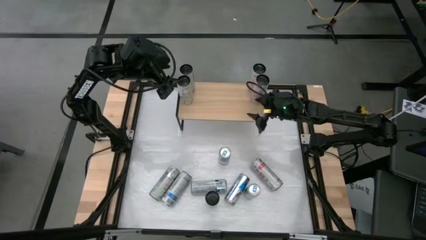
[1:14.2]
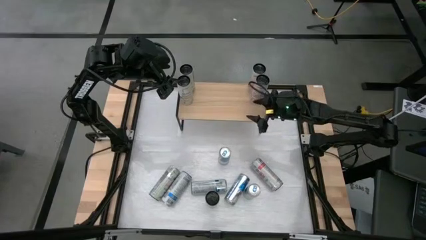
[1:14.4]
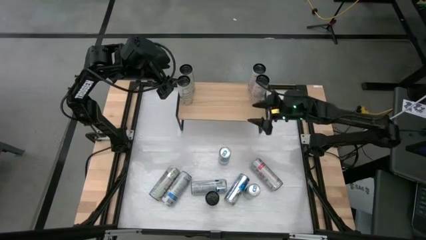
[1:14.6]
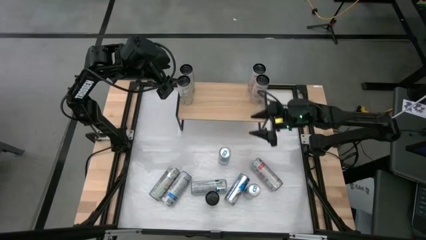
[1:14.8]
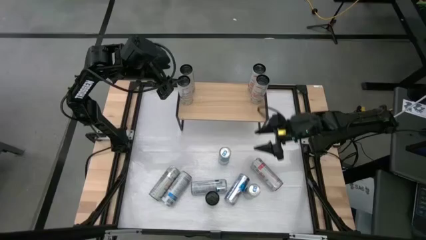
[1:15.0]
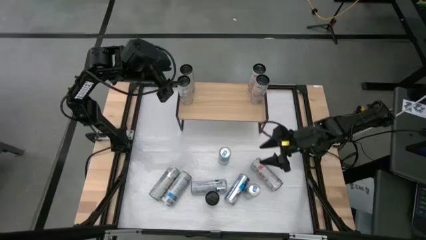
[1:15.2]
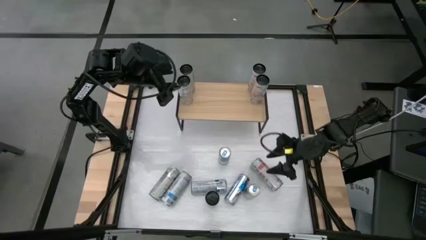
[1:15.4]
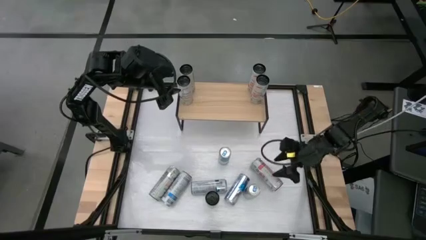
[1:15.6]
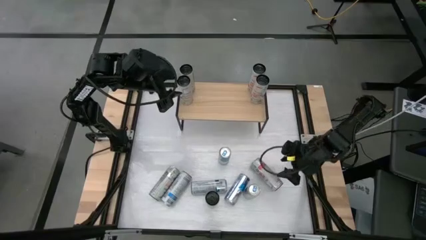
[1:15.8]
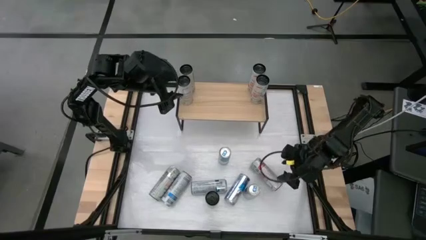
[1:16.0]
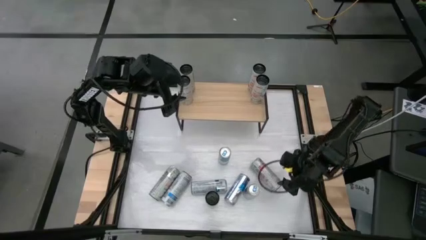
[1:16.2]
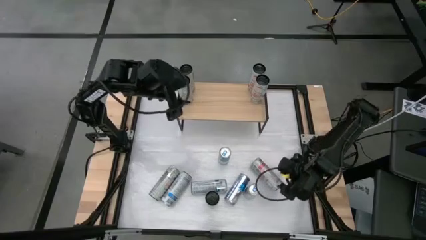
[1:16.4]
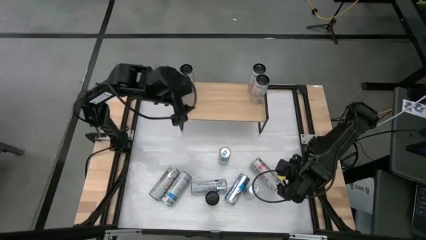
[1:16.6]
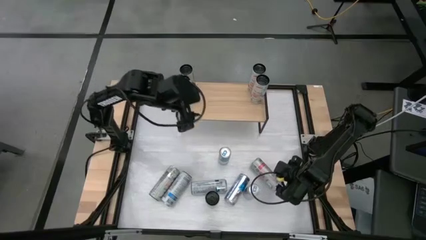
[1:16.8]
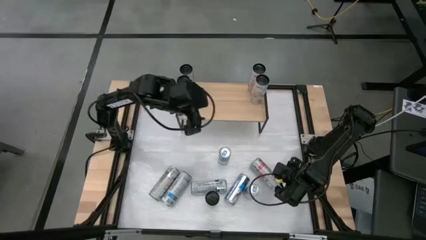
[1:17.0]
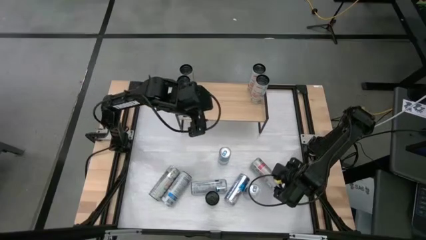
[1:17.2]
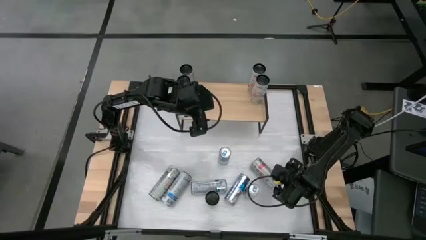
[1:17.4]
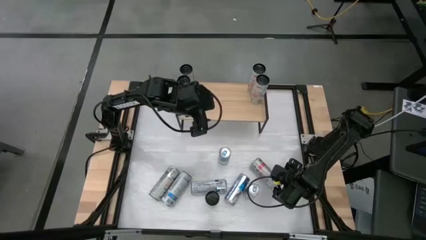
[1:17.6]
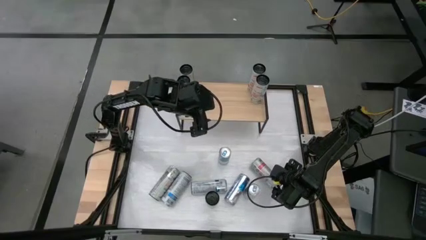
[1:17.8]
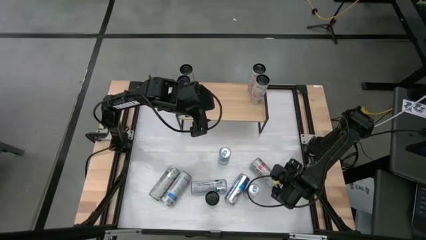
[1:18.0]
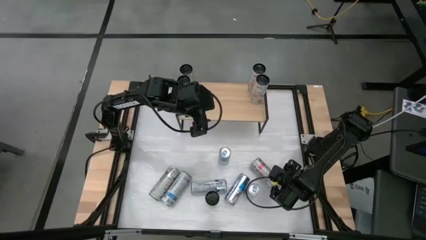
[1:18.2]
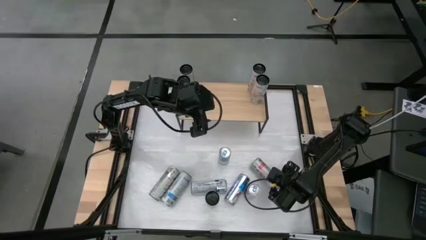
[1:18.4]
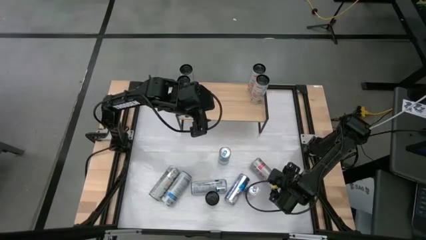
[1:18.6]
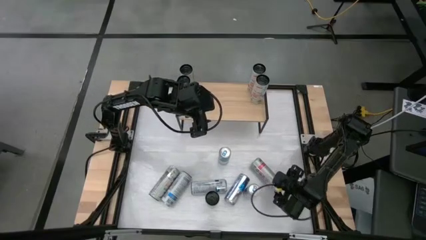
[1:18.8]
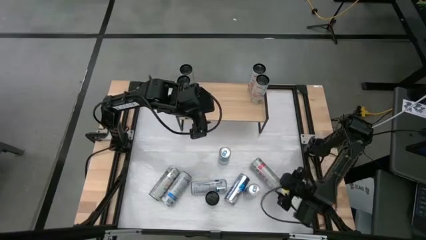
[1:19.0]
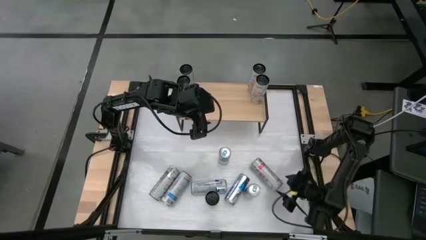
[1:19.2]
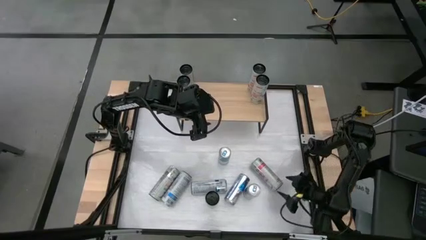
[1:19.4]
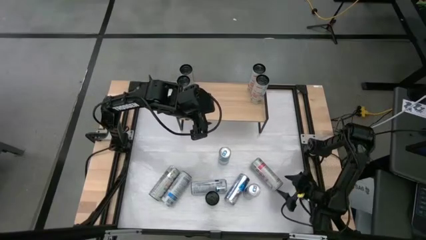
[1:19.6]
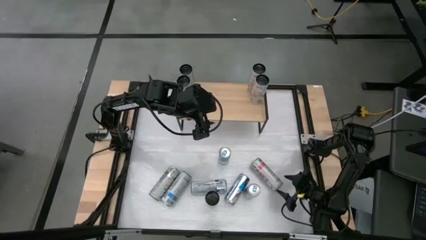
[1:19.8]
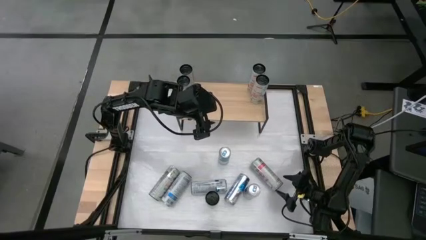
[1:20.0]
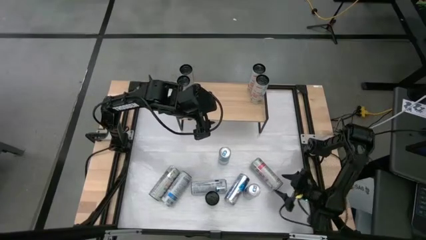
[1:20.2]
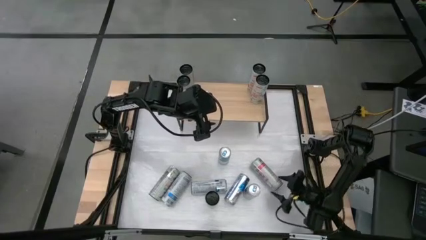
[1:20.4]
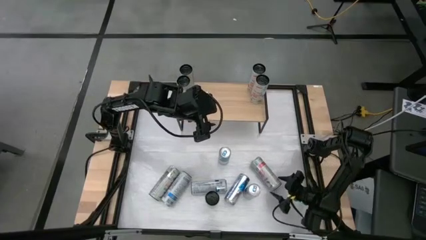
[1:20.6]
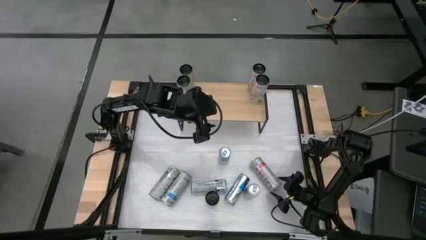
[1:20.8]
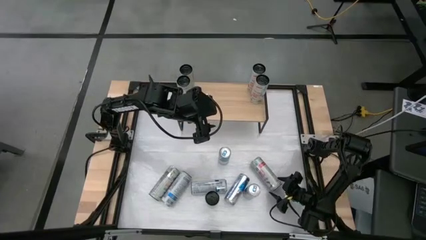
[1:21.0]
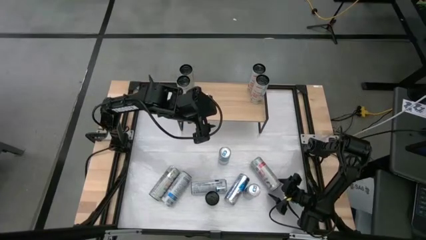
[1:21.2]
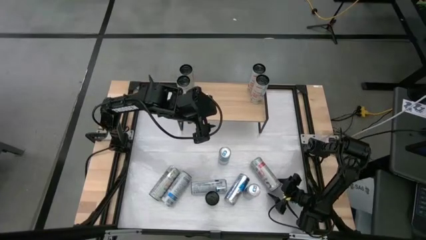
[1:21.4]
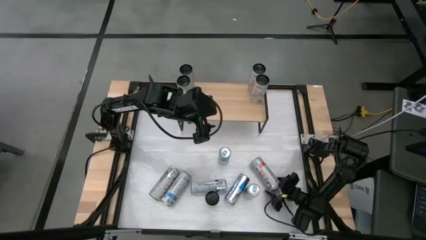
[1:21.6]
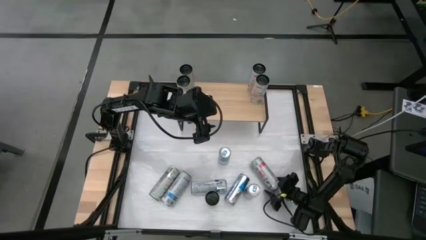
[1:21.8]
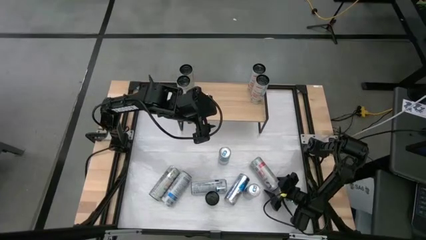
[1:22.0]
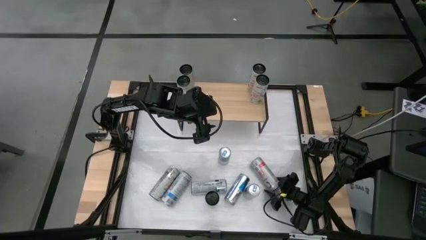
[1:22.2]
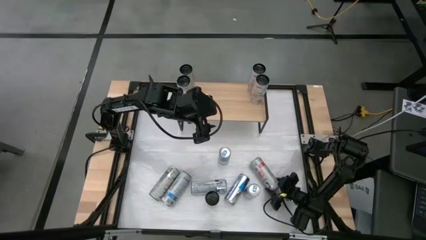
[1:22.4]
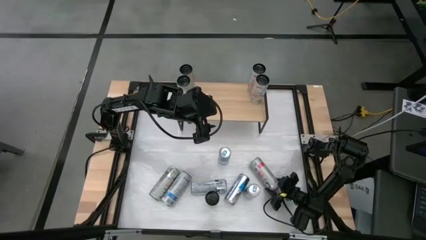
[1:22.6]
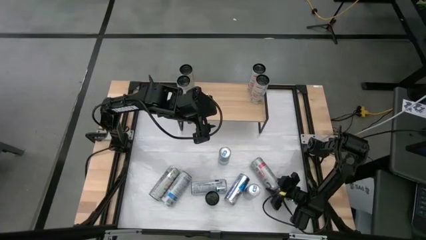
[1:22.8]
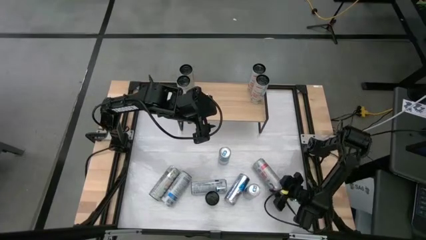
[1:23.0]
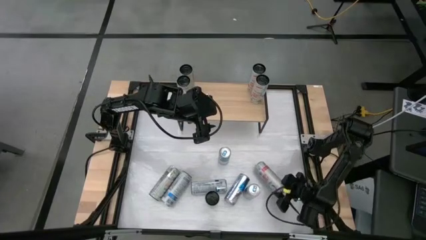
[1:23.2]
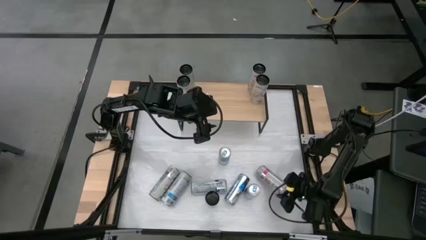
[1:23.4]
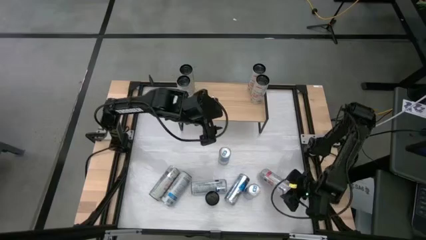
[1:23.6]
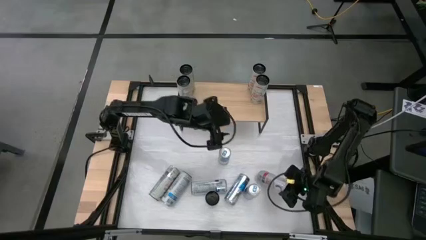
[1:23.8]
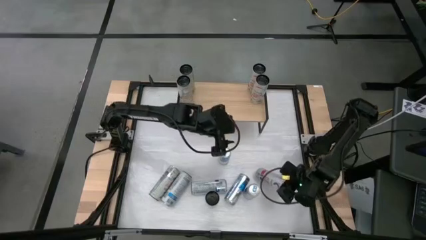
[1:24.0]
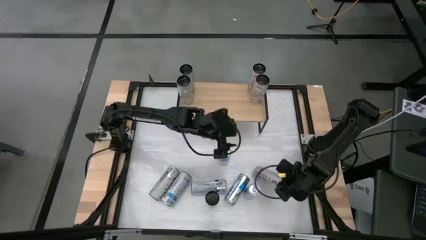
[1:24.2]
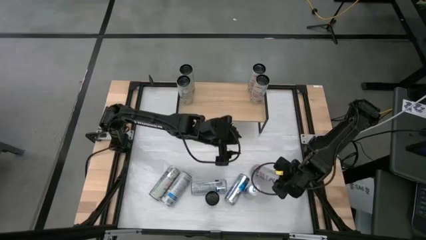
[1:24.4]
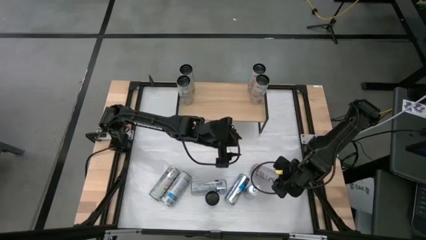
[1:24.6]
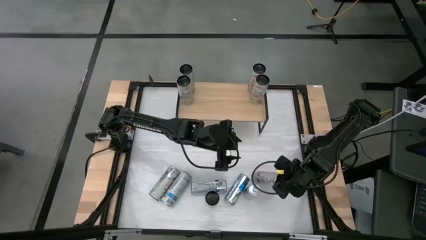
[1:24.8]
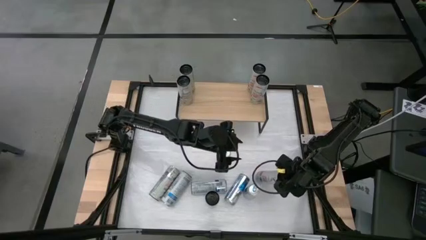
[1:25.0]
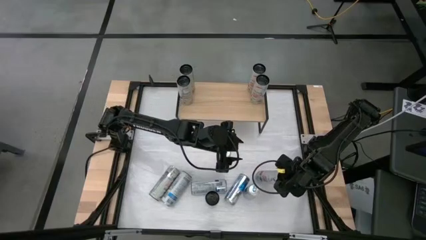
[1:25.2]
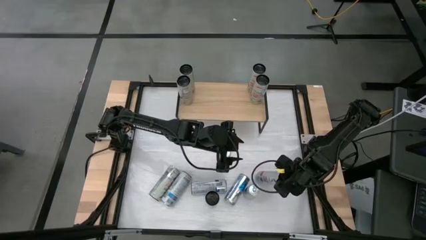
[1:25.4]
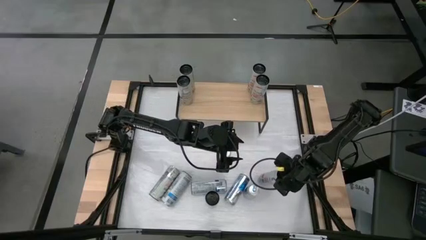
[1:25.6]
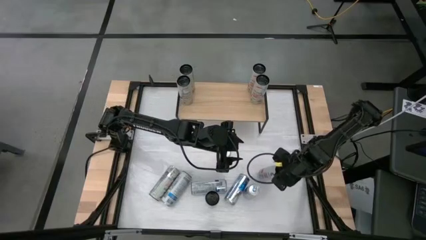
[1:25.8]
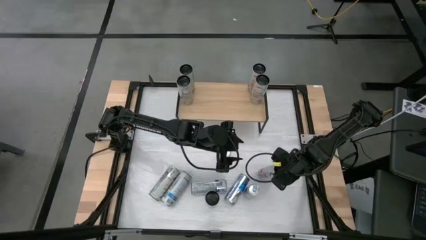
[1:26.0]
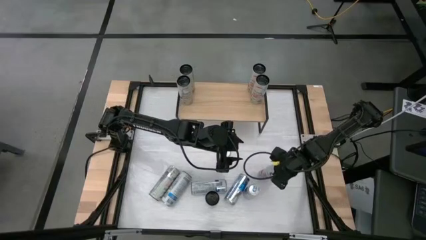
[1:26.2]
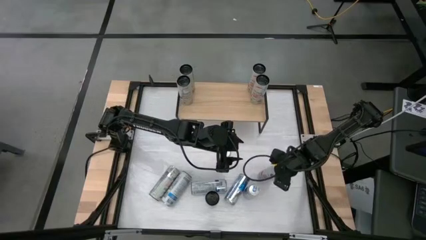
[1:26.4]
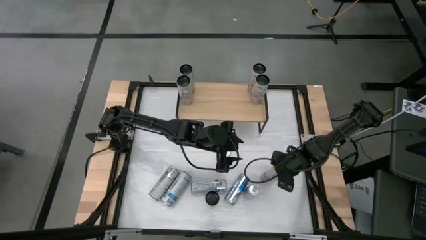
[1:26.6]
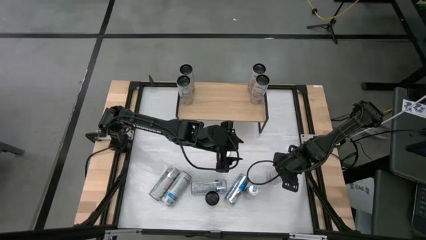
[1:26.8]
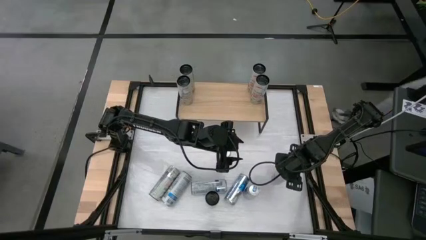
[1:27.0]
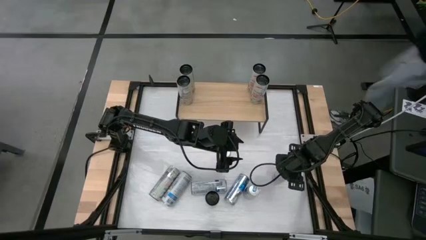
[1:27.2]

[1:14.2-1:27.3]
Task: Sort soda cans
Put the white pink soda can on the shelf and align with other white pink soda cans

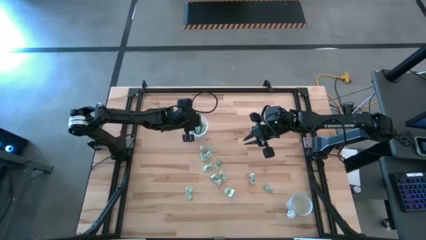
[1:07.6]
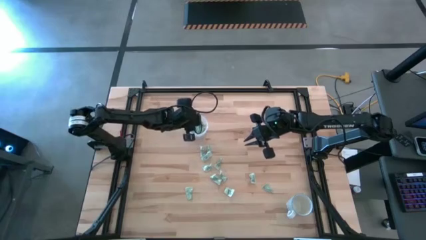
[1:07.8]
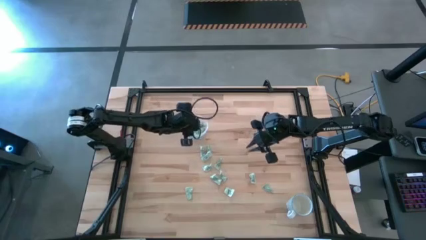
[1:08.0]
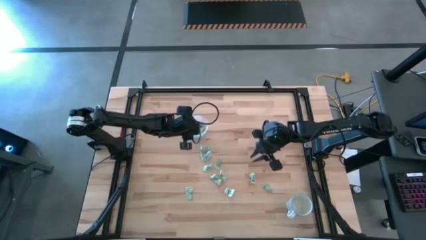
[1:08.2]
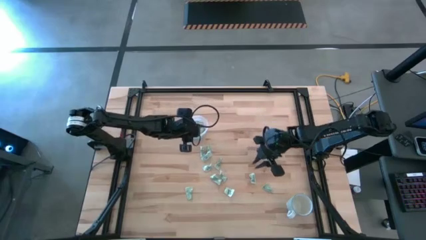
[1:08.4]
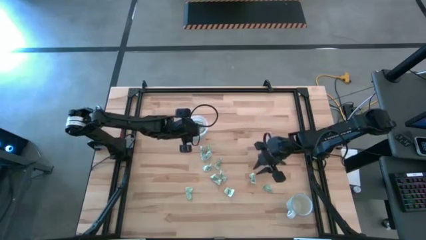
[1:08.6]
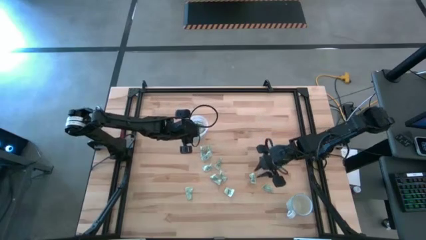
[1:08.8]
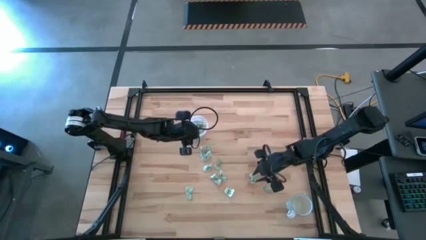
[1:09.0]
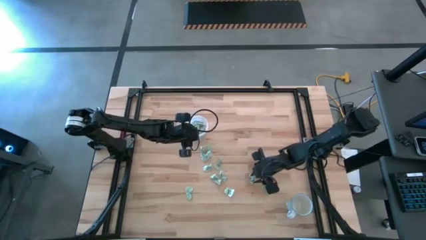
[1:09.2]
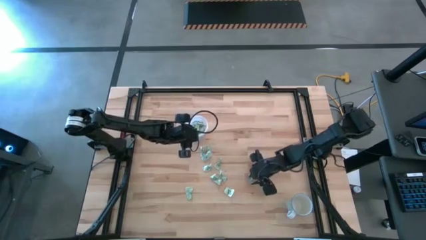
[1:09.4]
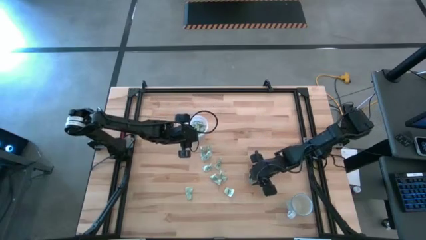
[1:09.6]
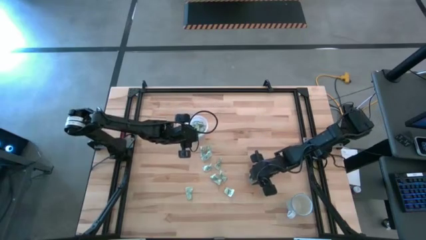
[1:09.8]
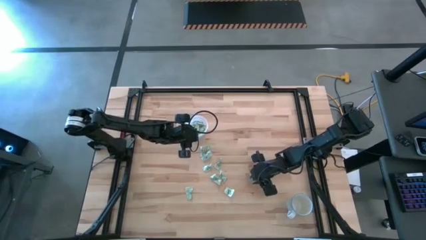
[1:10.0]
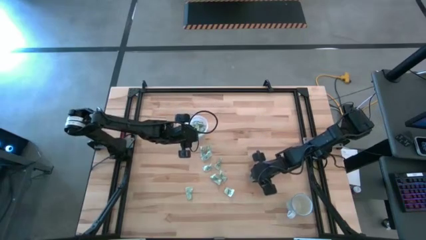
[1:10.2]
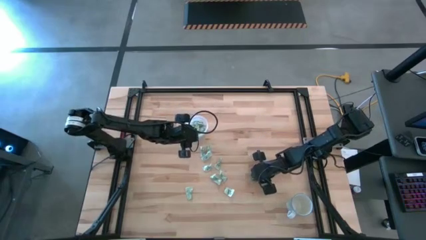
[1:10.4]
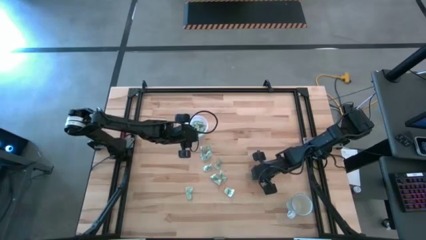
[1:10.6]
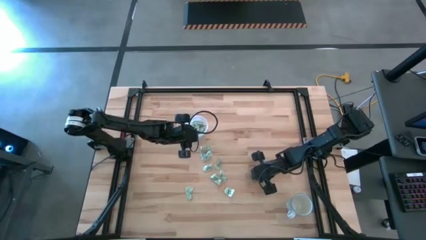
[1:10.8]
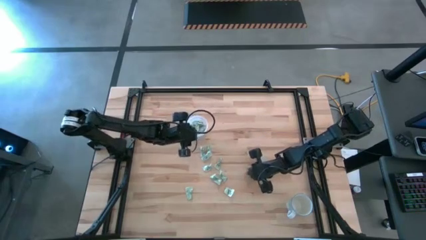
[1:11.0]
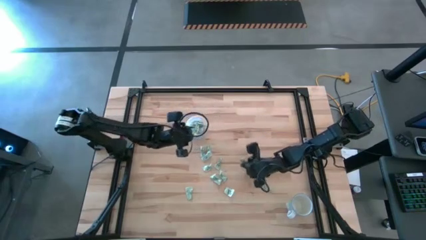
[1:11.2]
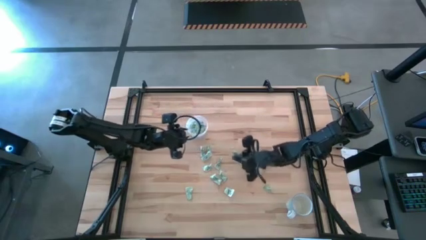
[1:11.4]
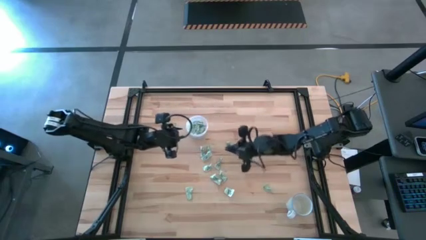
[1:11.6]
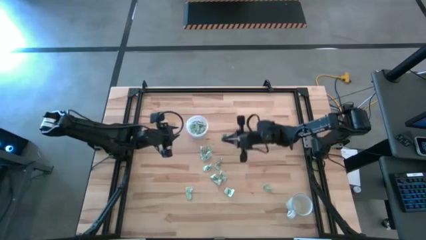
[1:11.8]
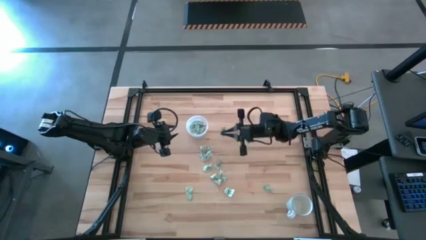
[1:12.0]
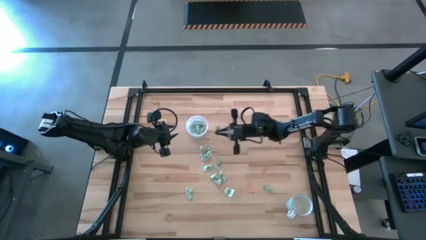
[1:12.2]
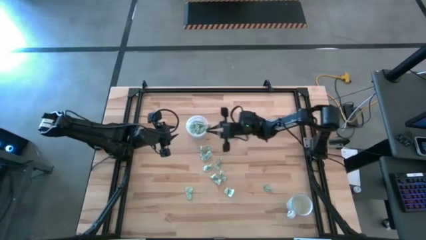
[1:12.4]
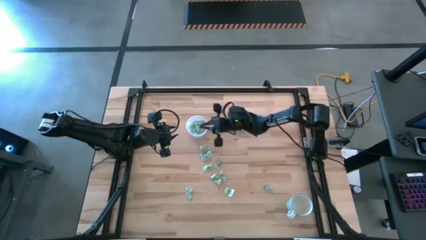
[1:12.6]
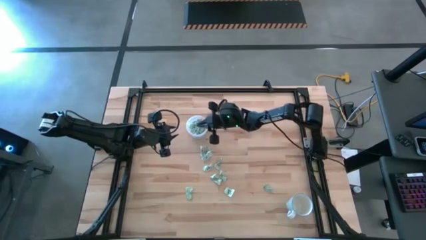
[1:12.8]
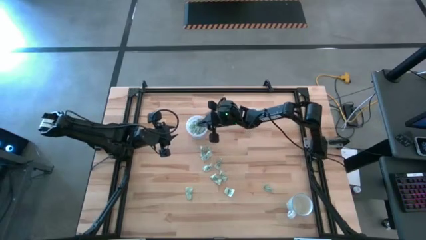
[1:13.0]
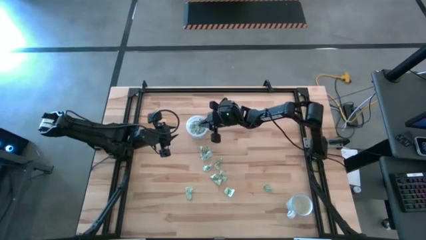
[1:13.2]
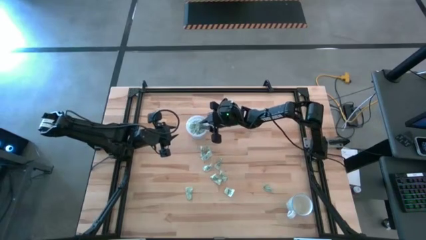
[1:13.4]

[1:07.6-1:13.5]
Task: Pick and place Stevia / Truvia into bins
Put the stevia packet into the transparent container
